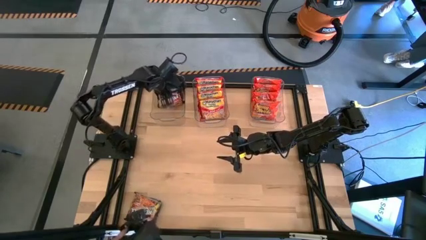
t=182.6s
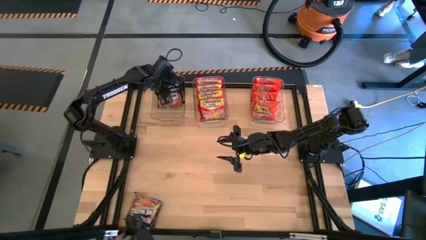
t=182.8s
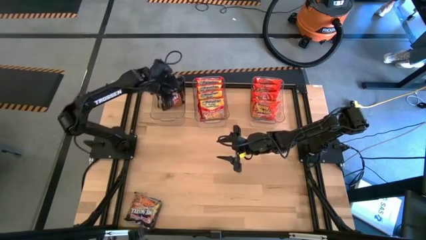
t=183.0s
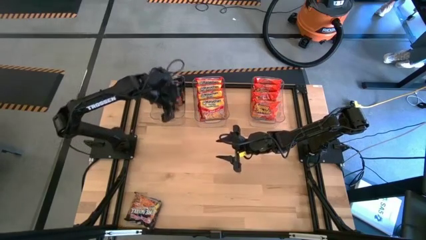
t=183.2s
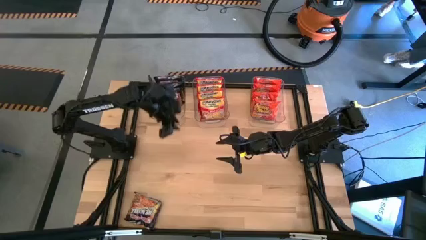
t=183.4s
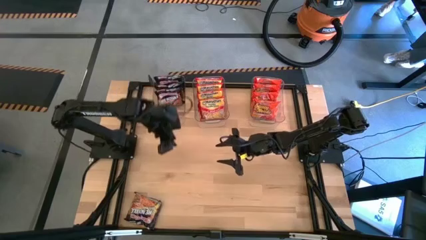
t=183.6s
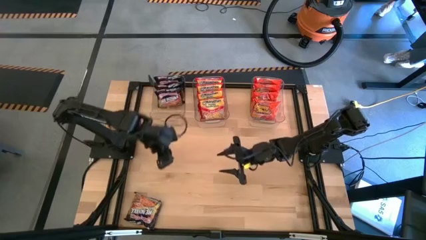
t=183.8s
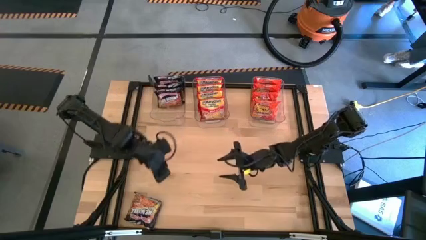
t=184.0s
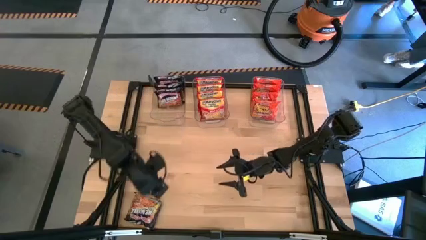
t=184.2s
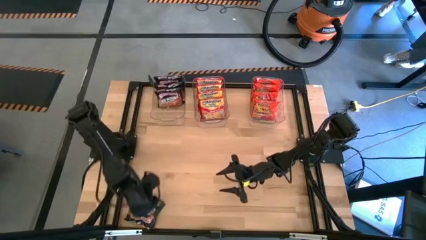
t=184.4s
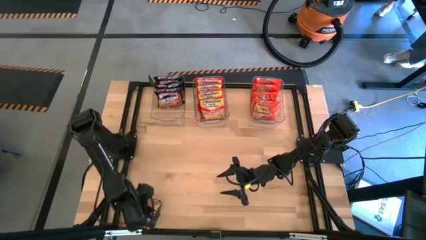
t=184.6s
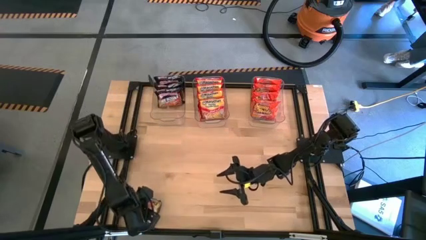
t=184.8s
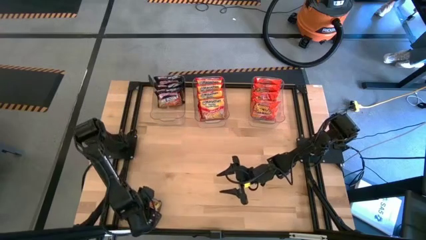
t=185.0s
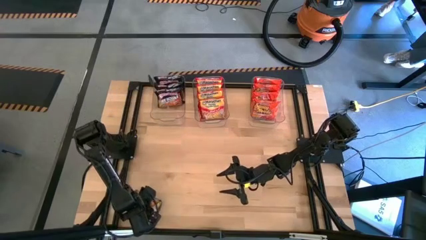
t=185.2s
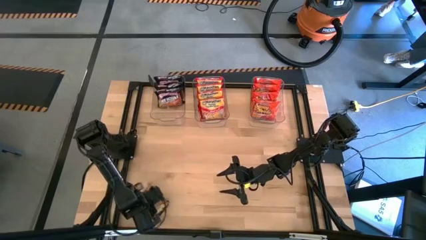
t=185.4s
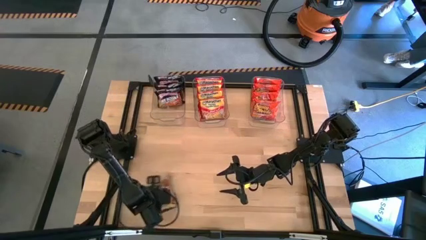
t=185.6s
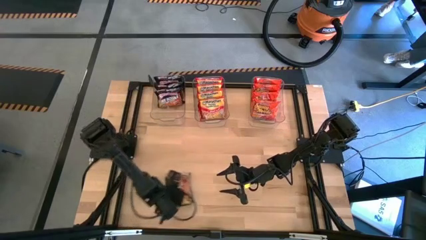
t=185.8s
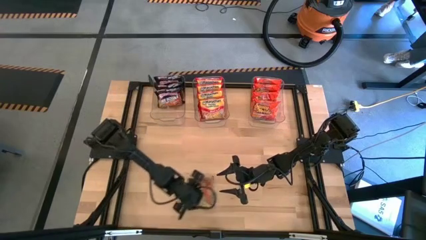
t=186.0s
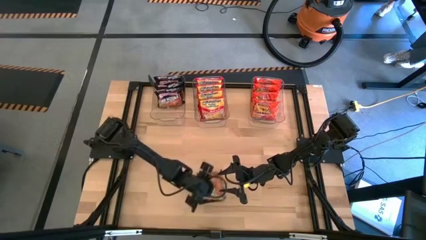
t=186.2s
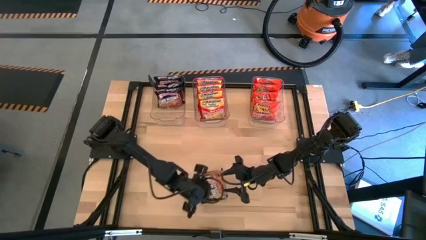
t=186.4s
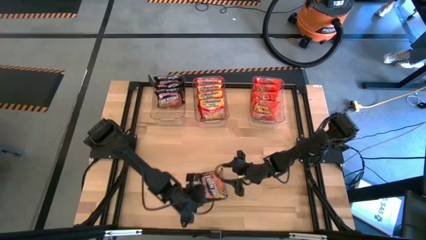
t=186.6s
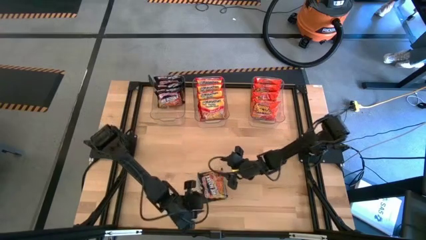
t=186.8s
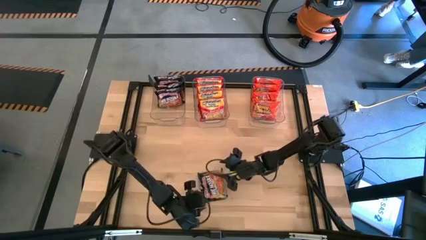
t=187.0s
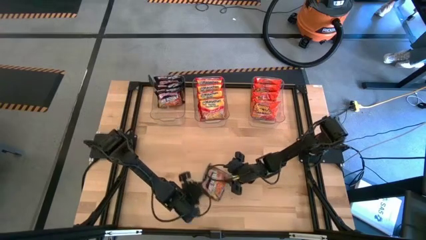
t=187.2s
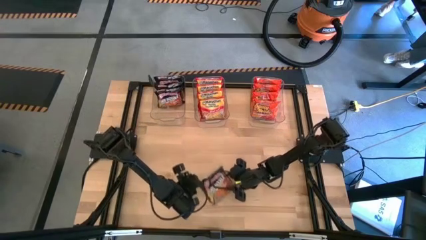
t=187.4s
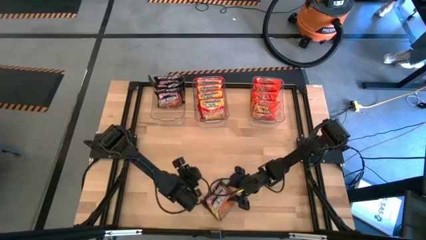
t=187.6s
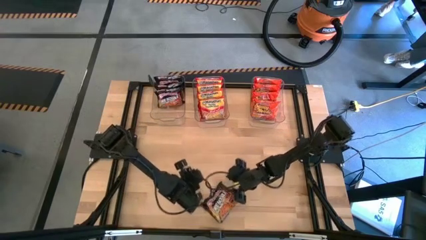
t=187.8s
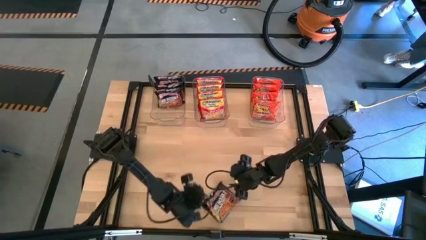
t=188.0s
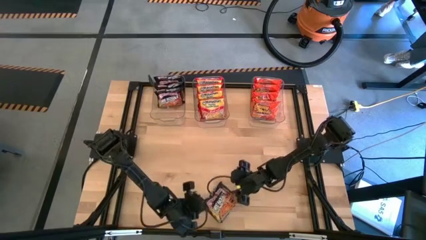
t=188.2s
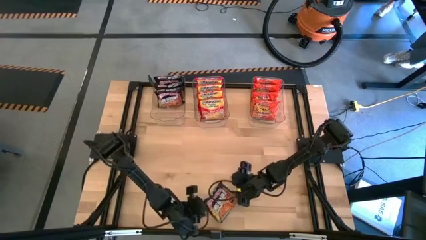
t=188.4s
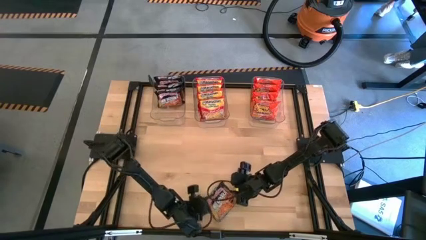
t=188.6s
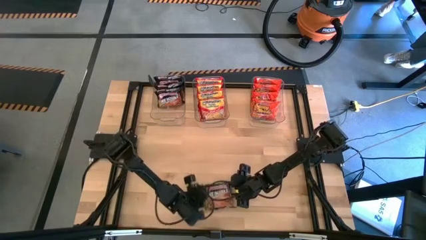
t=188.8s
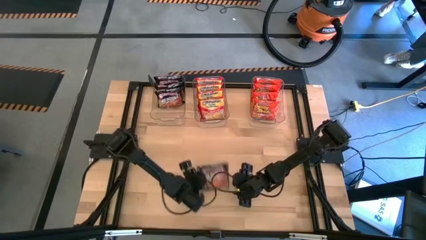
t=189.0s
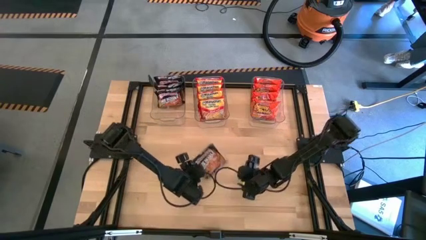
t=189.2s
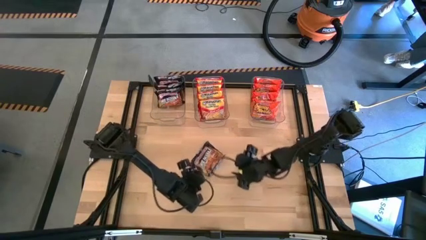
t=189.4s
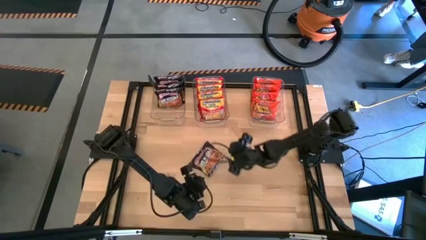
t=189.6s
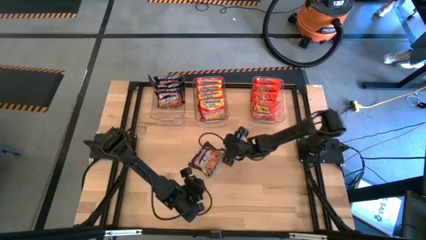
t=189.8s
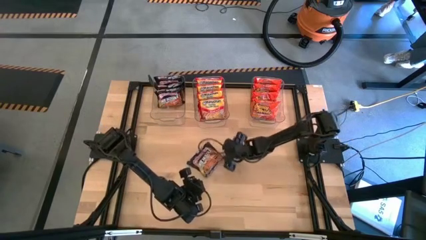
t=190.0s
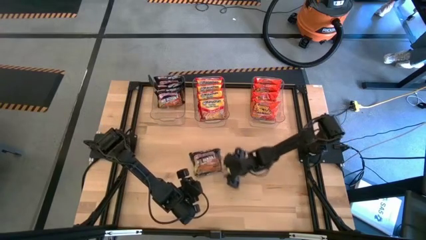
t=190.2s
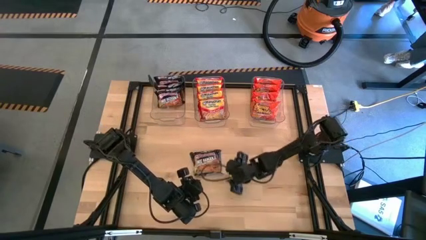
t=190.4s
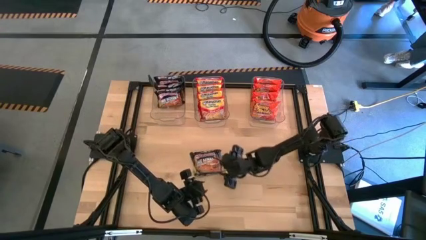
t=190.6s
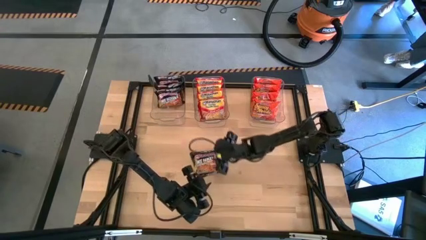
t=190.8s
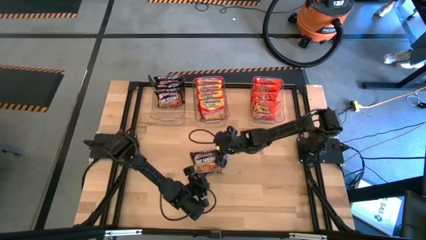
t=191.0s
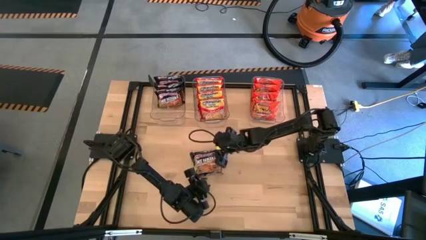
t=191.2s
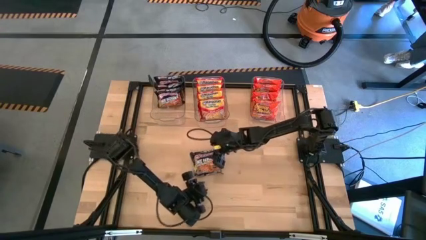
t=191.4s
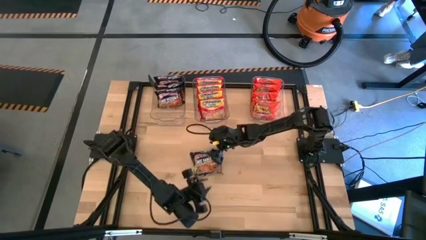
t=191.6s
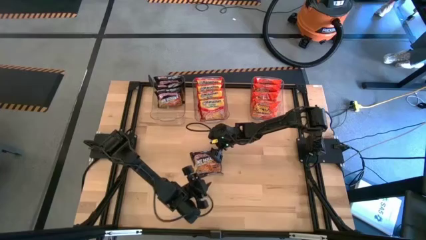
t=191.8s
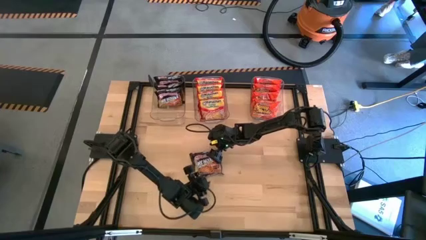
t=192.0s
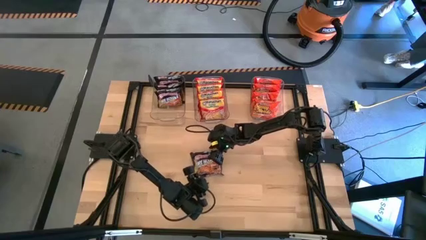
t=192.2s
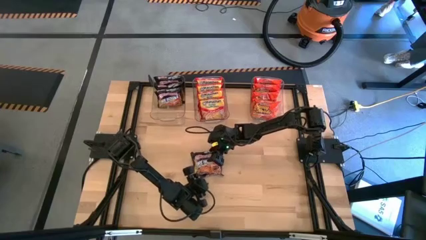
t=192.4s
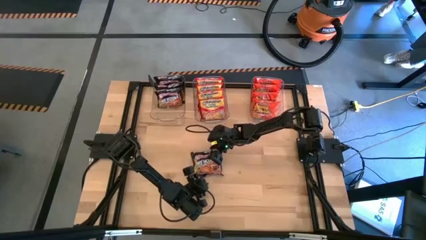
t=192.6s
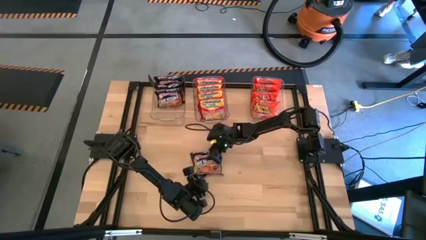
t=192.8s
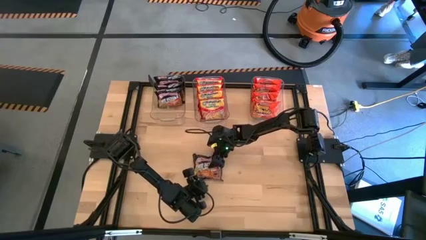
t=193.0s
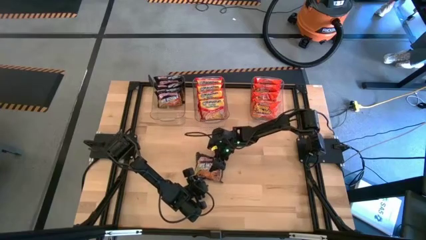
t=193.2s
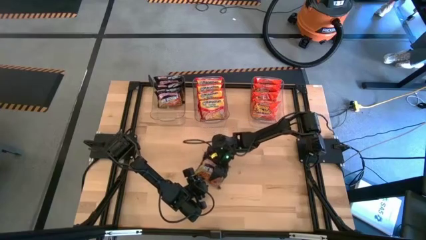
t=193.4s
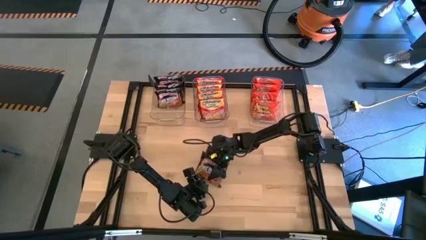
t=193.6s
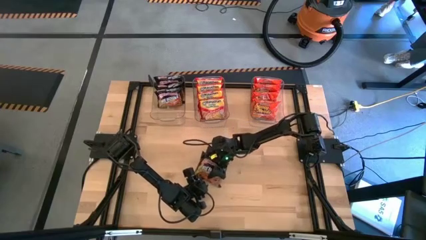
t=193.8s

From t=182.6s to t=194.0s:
Task: Sort Maruchan noodles
Put the black noodle pack into the left transparent bin
